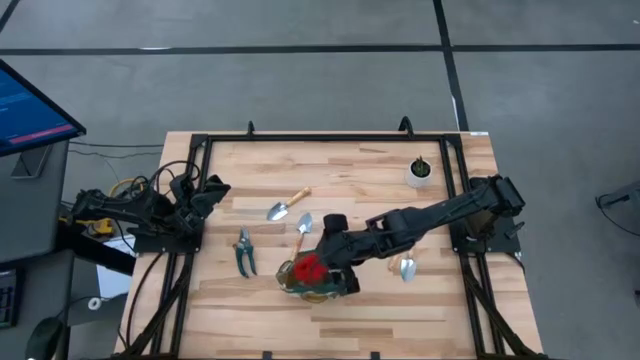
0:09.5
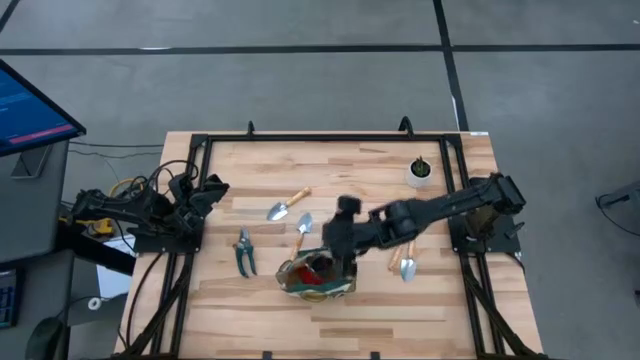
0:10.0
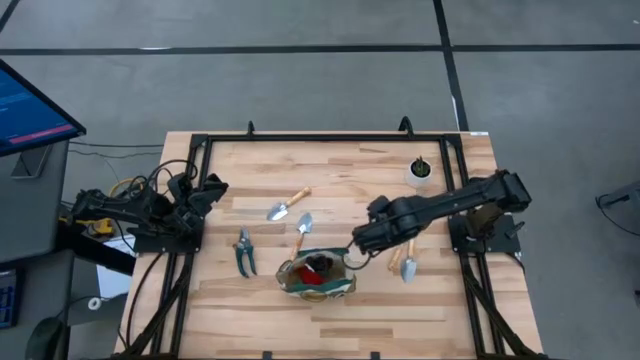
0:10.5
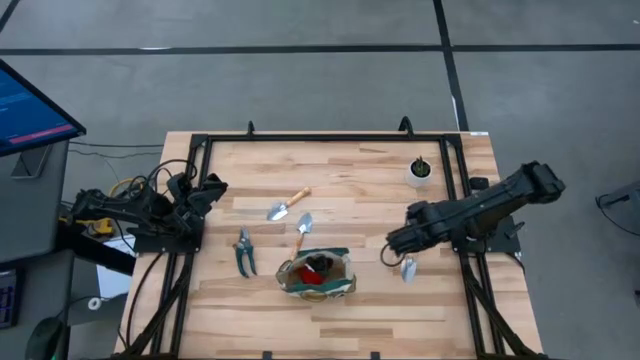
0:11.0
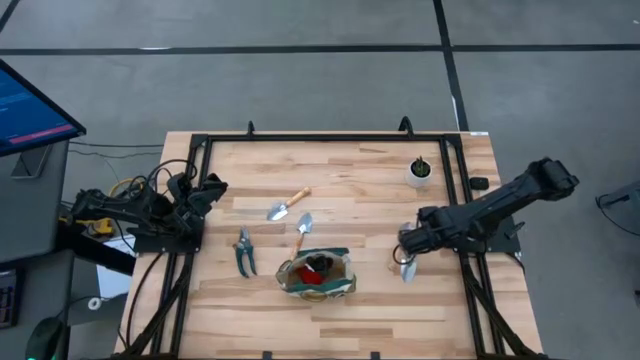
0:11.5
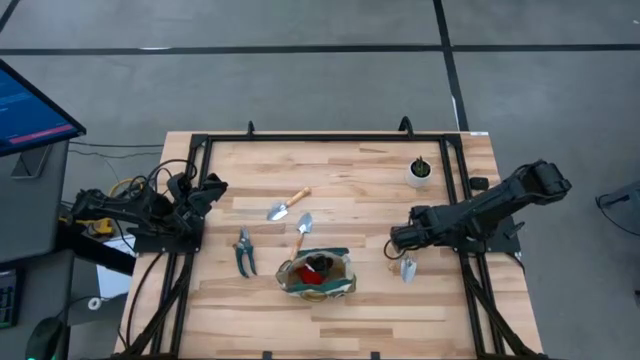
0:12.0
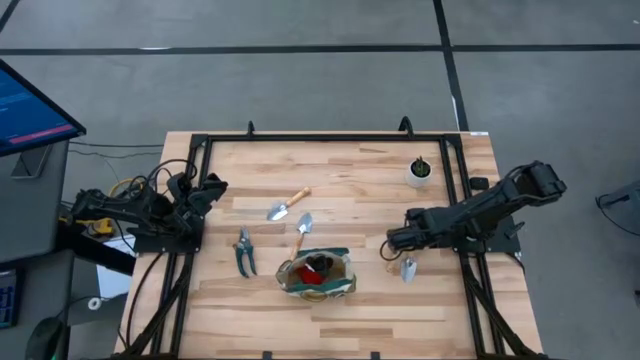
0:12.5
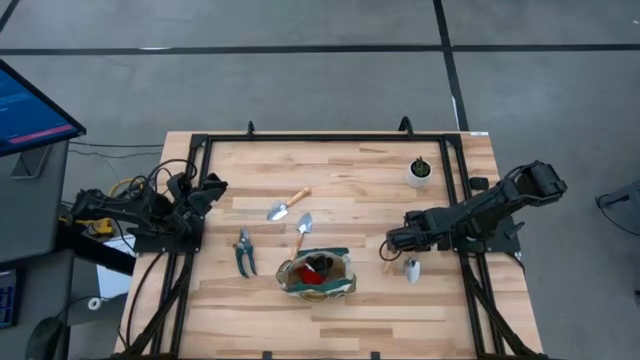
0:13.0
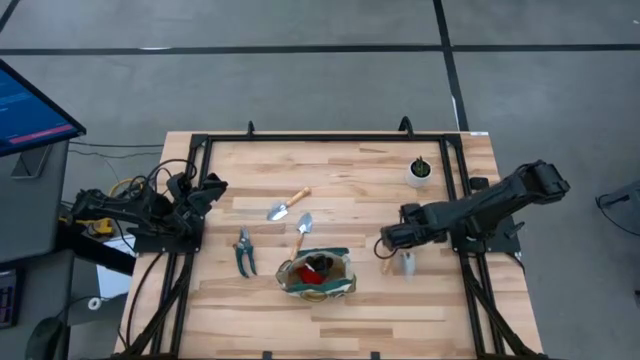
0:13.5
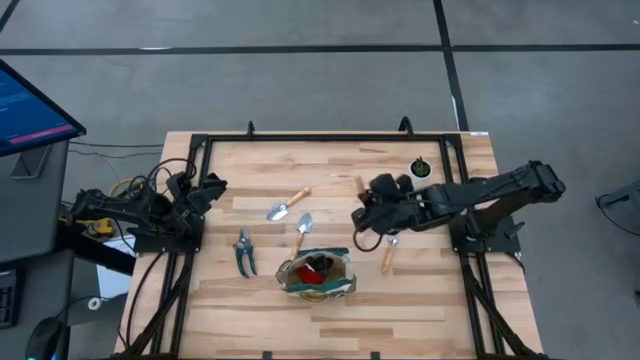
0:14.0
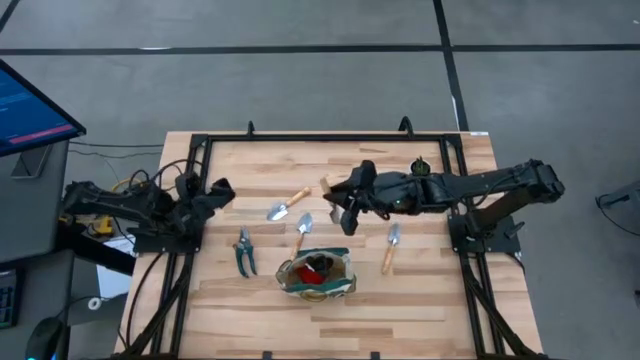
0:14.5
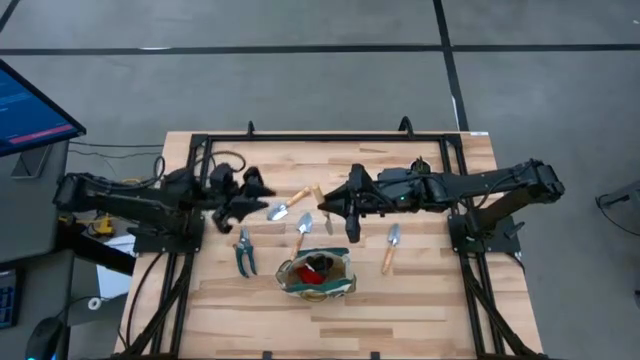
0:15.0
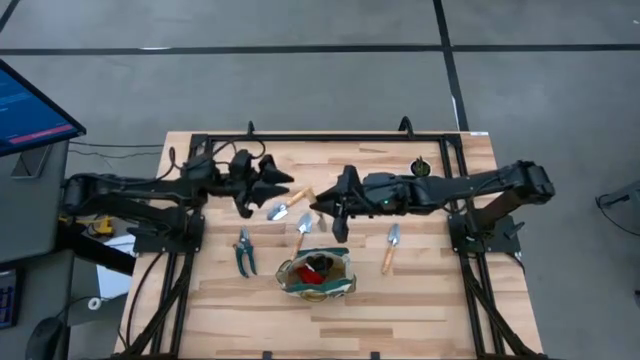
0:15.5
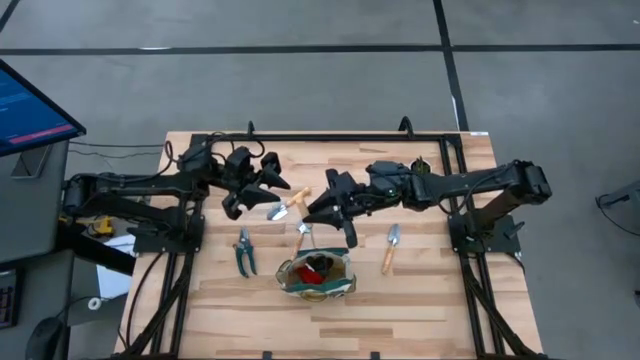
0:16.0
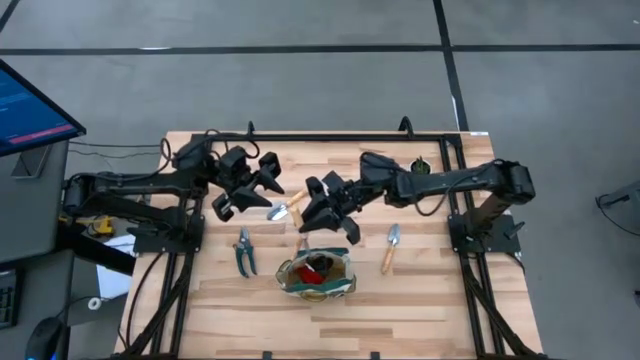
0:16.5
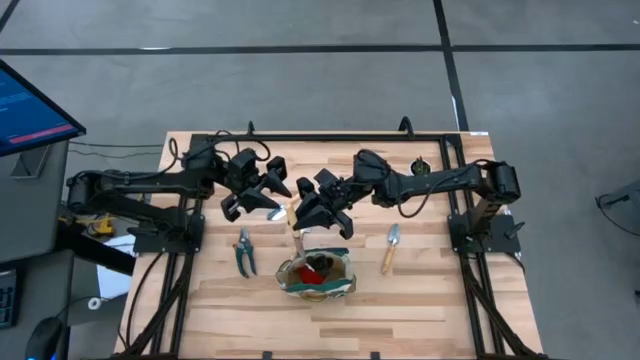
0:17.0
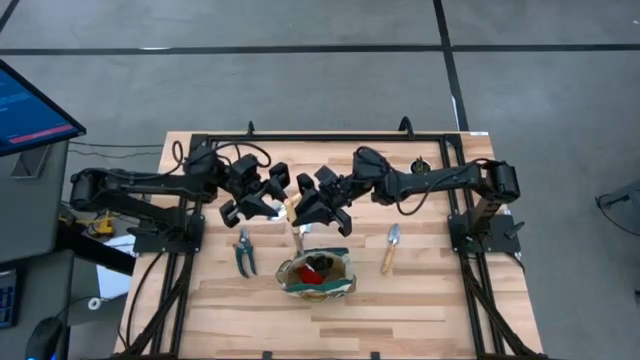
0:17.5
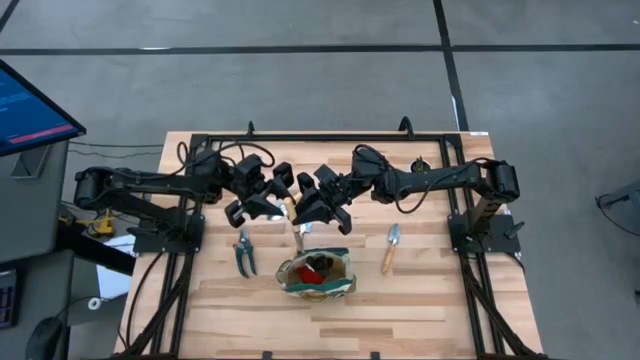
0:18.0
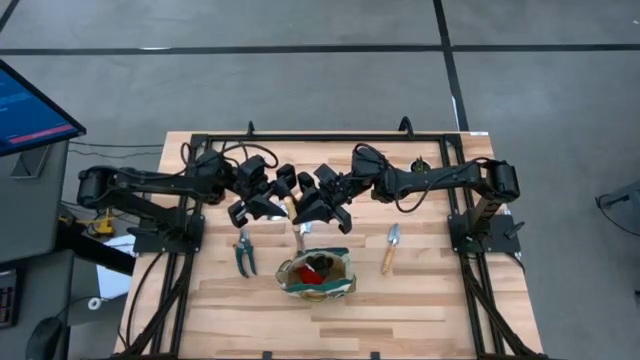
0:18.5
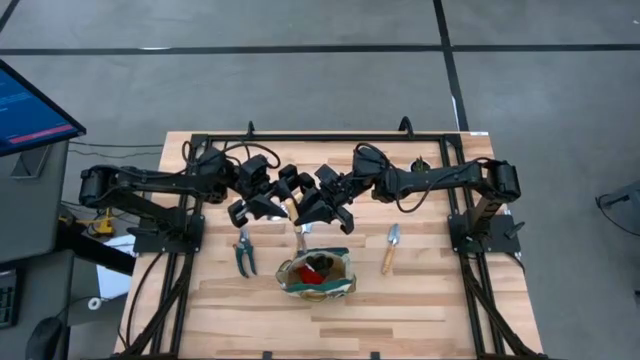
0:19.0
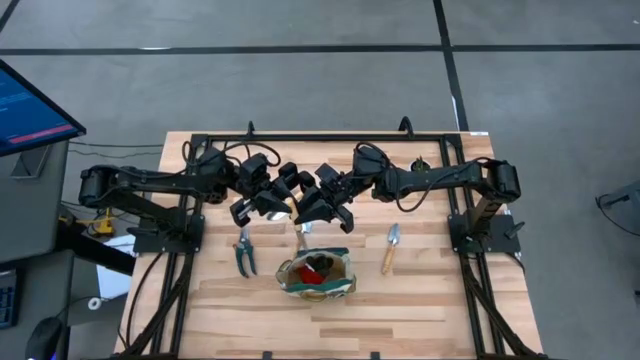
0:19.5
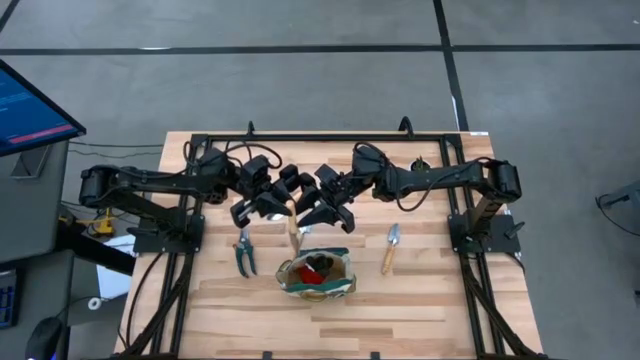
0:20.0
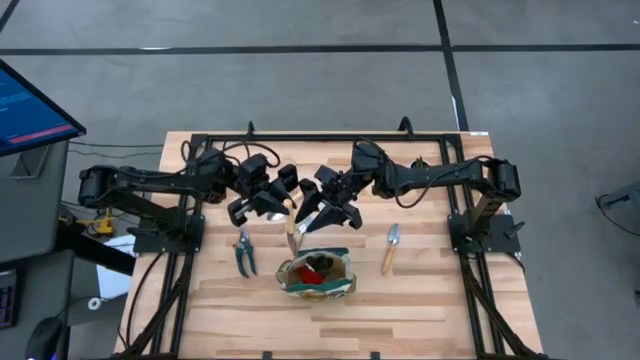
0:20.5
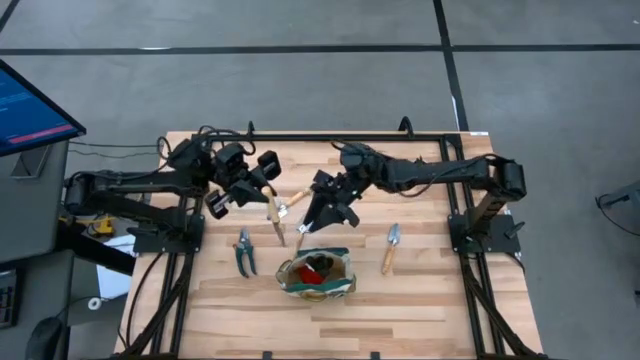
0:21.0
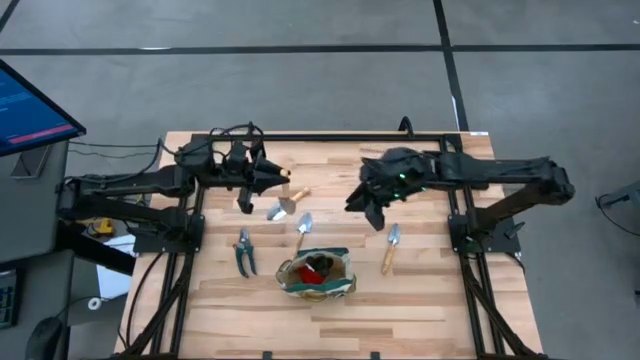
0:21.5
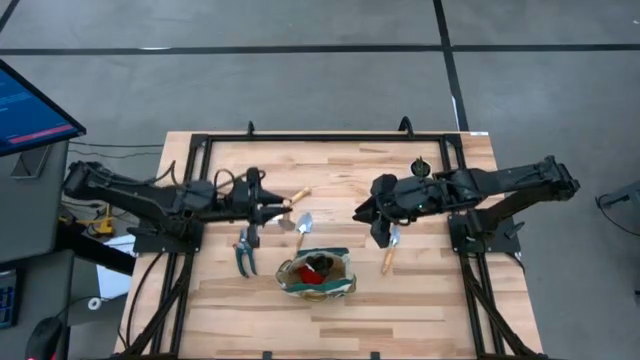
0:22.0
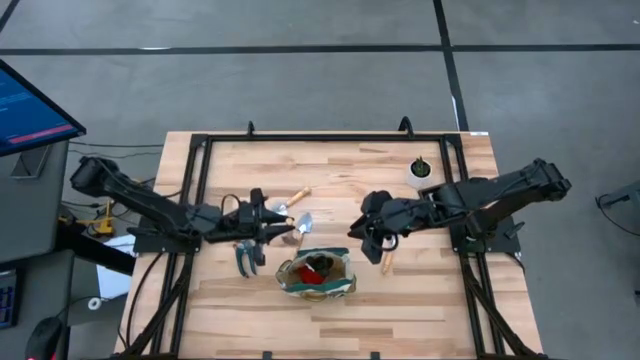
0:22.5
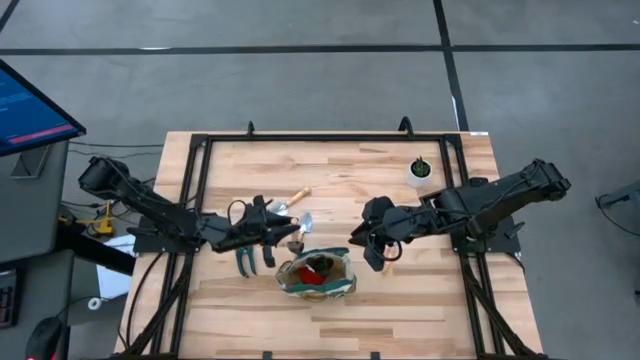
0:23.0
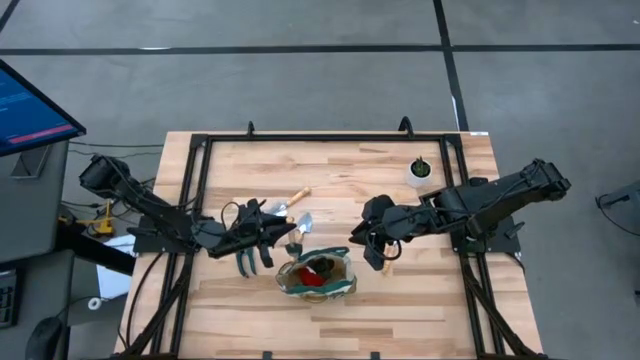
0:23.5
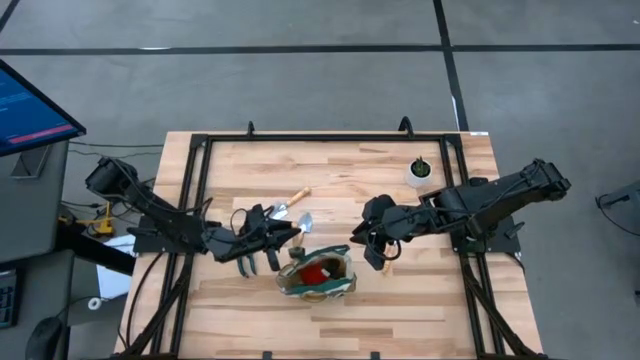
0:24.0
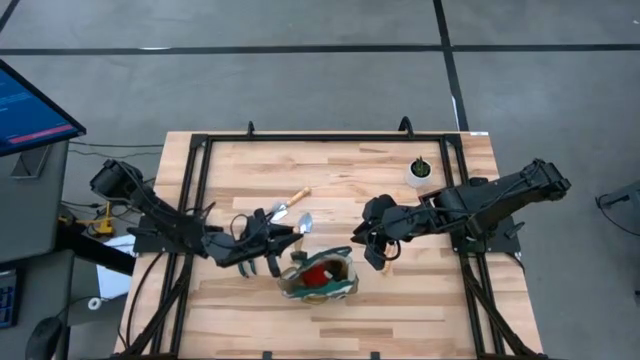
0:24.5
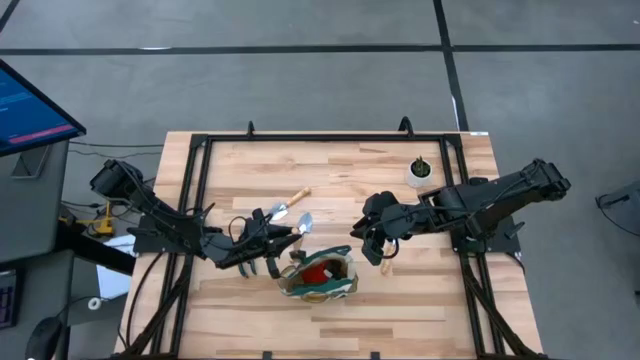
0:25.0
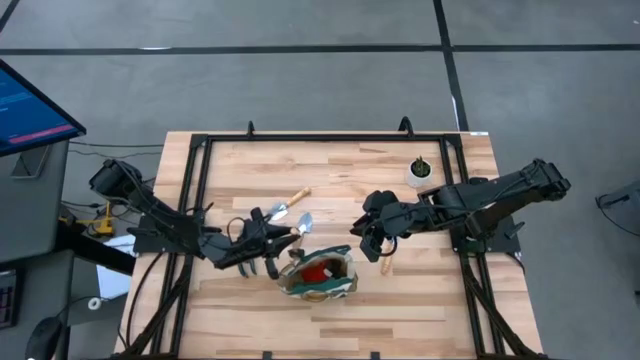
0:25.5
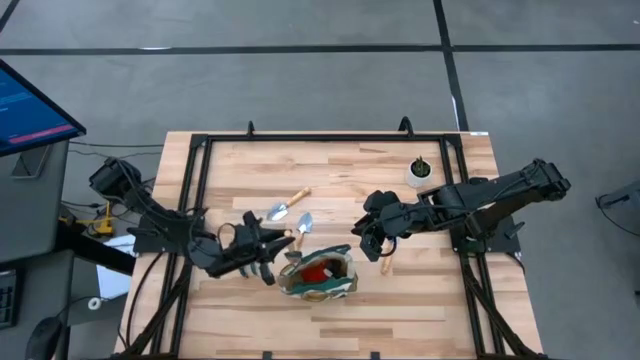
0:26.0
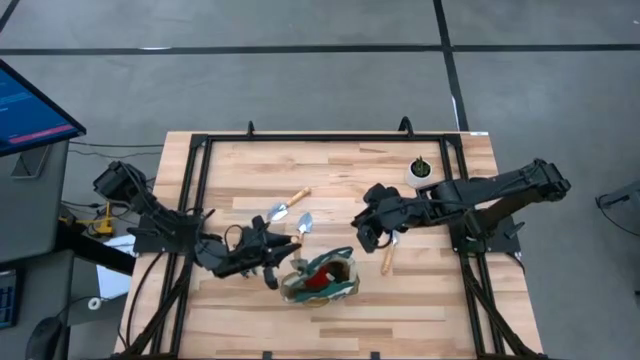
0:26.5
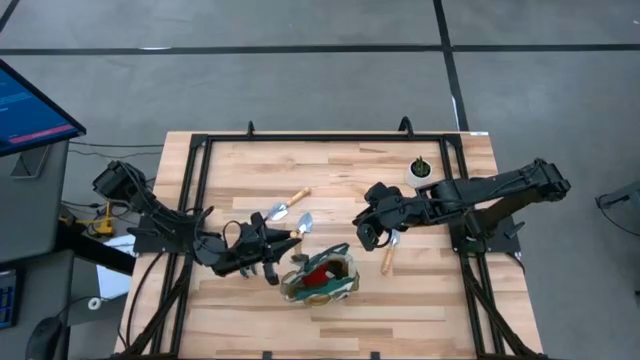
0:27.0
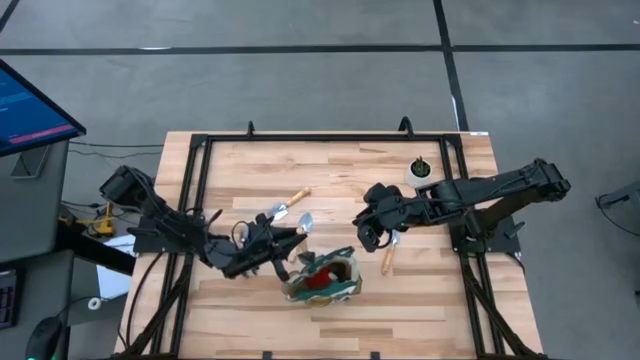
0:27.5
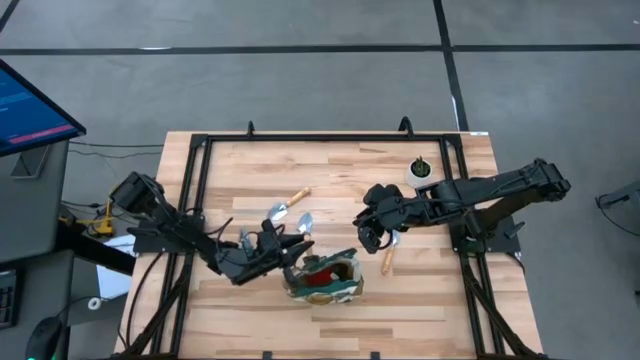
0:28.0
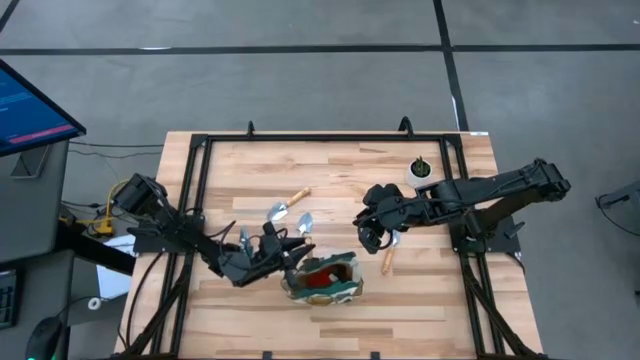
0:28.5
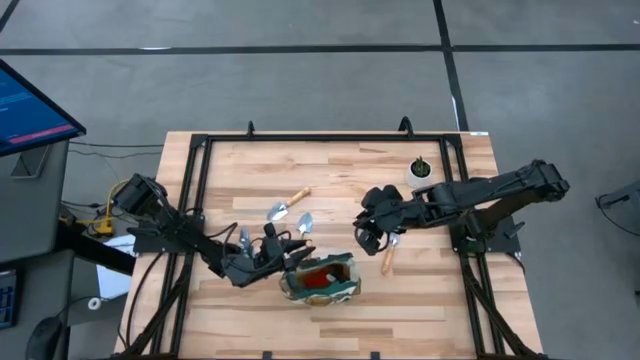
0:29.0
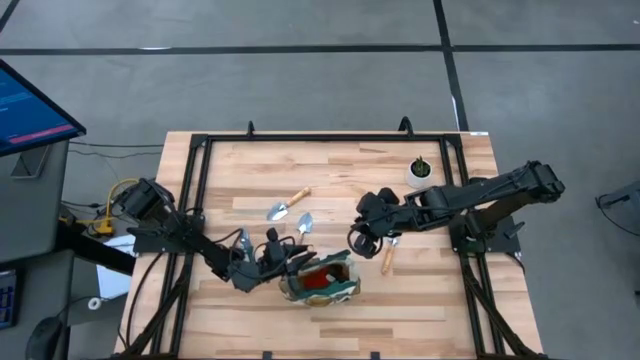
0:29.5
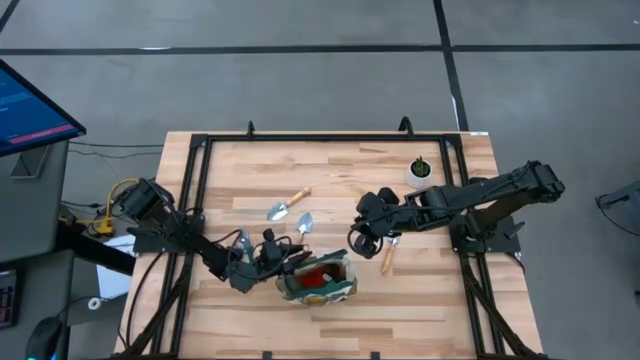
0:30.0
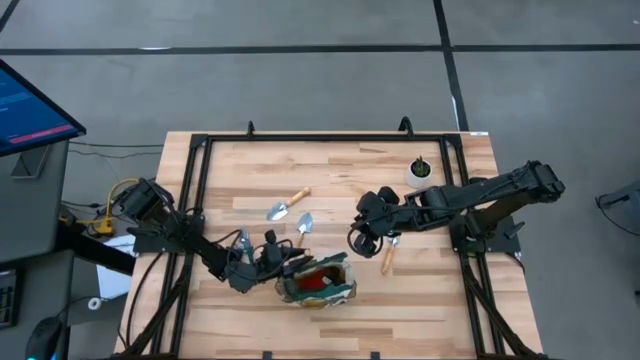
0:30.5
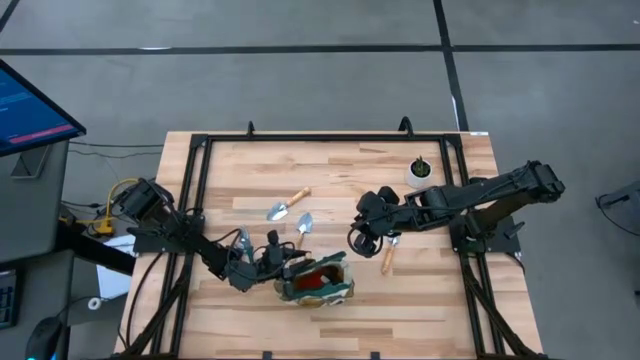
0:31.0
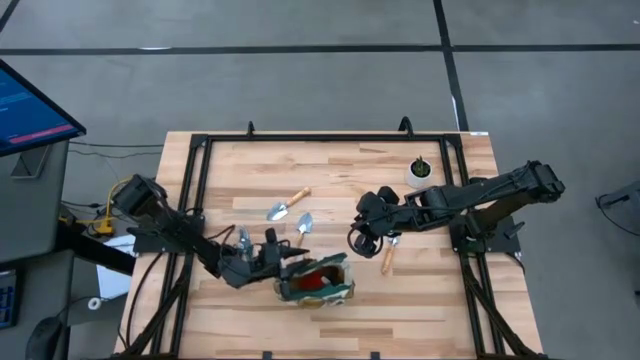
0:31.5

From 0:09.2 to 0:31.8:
Task: Pick & Place Garden tools in Gardening bag
Put the brown trowel into the gardening bag pocket
